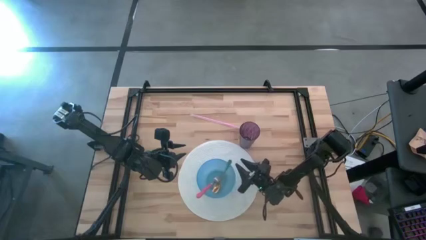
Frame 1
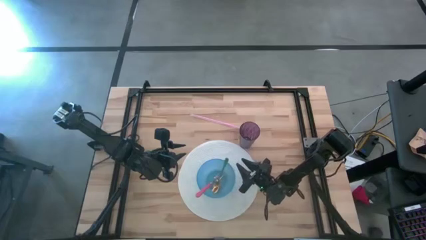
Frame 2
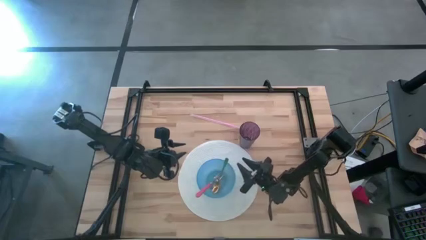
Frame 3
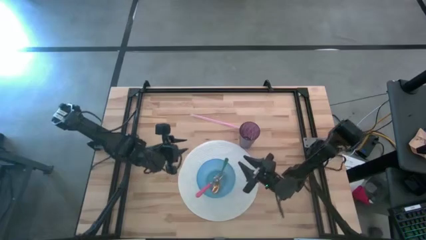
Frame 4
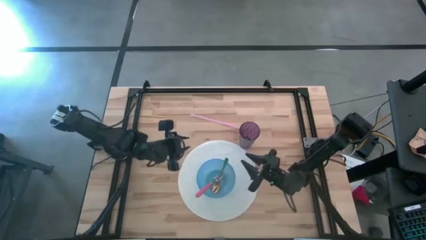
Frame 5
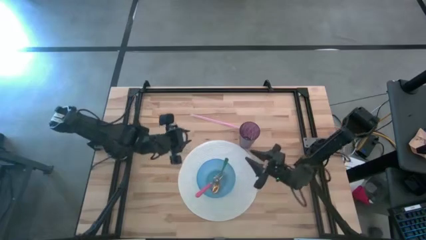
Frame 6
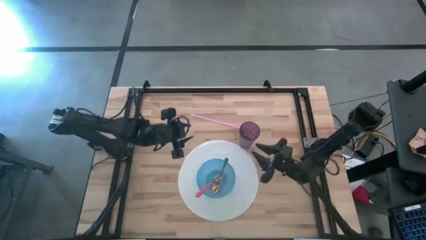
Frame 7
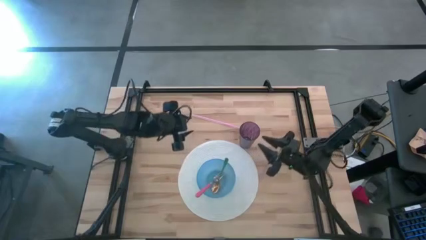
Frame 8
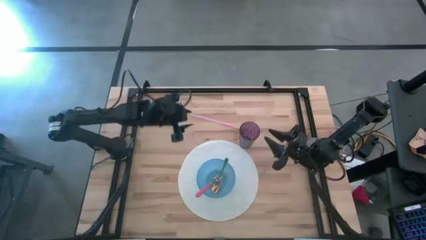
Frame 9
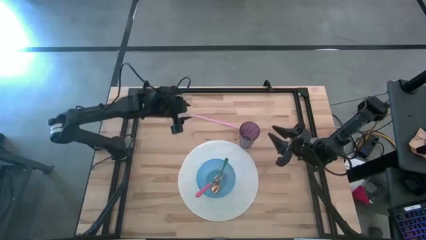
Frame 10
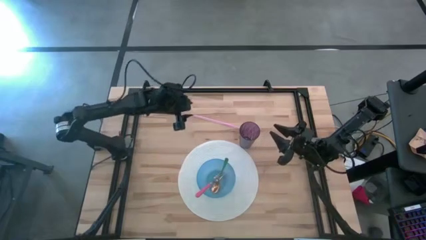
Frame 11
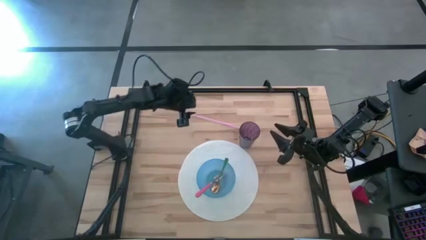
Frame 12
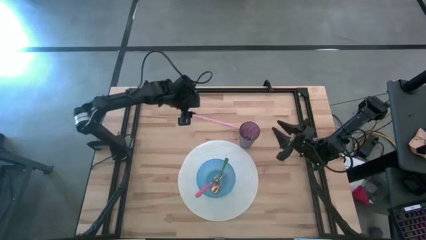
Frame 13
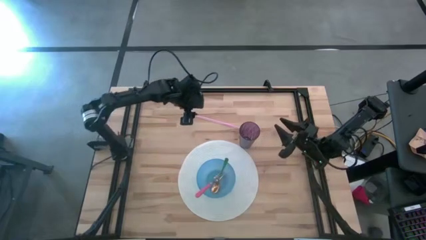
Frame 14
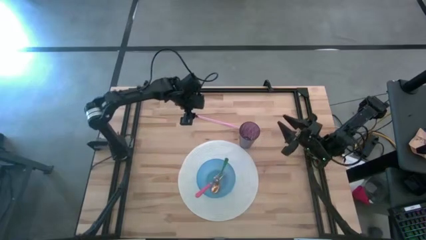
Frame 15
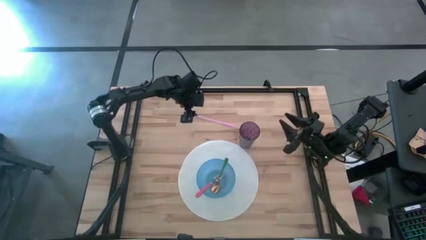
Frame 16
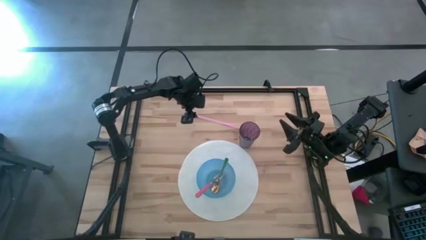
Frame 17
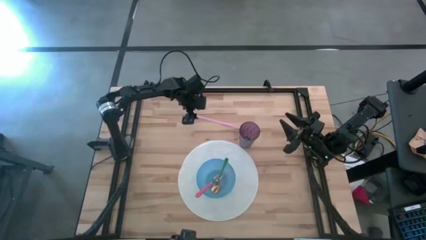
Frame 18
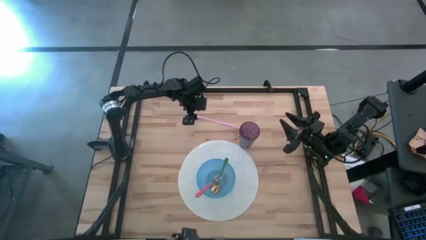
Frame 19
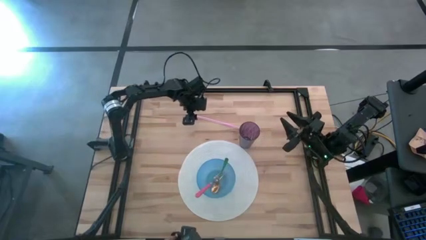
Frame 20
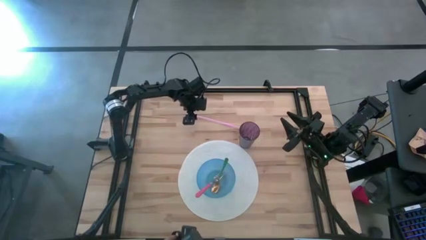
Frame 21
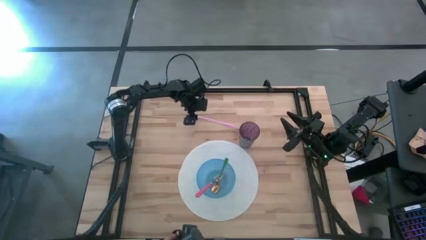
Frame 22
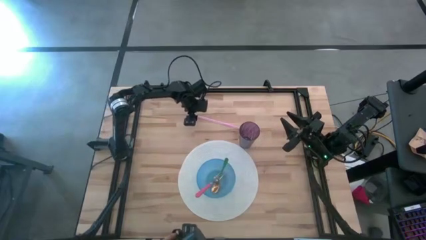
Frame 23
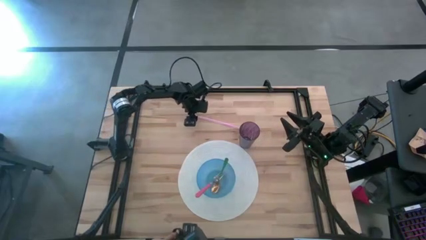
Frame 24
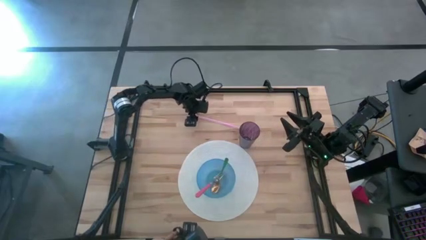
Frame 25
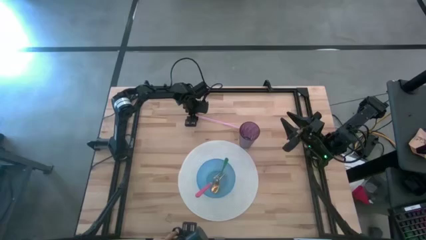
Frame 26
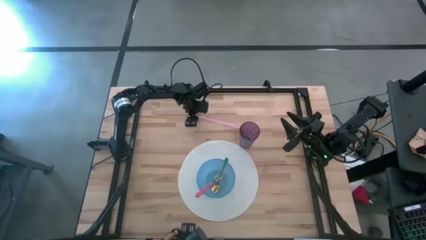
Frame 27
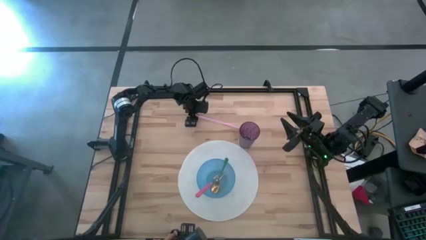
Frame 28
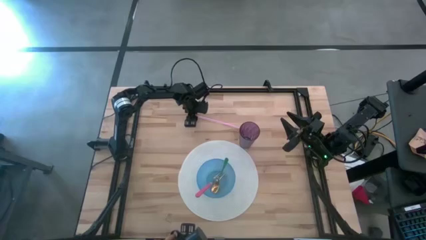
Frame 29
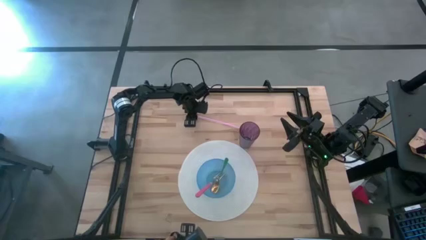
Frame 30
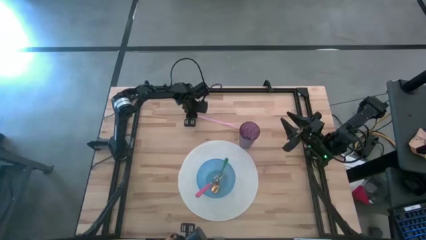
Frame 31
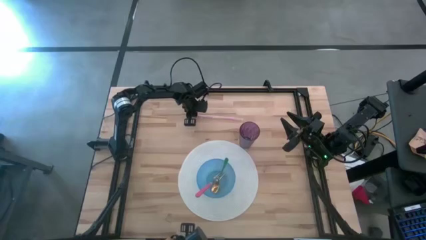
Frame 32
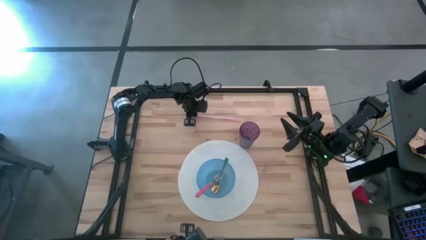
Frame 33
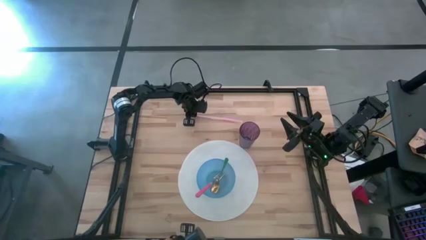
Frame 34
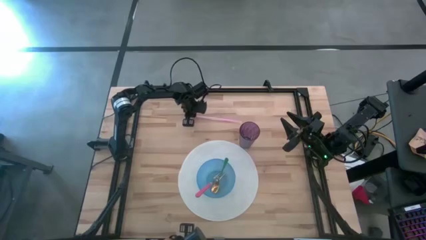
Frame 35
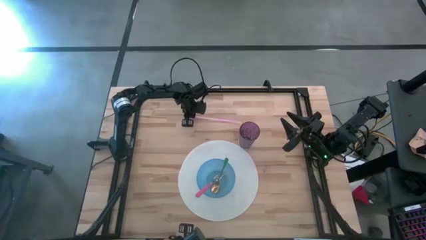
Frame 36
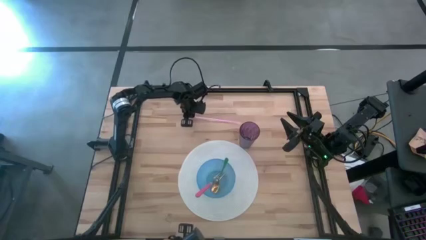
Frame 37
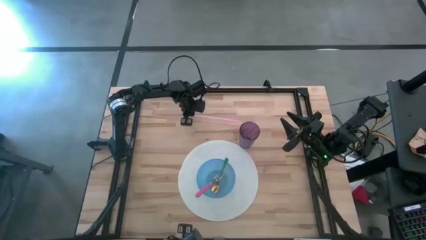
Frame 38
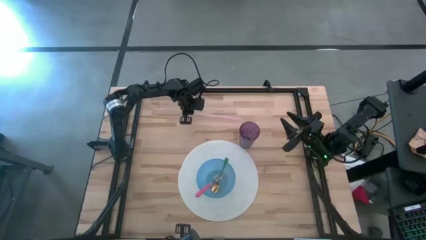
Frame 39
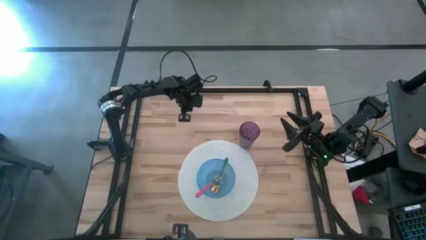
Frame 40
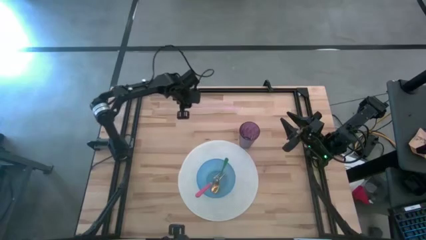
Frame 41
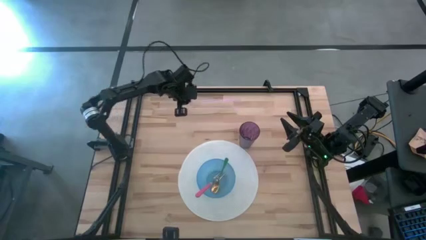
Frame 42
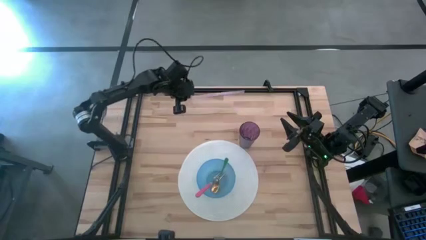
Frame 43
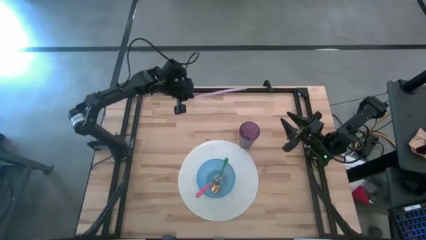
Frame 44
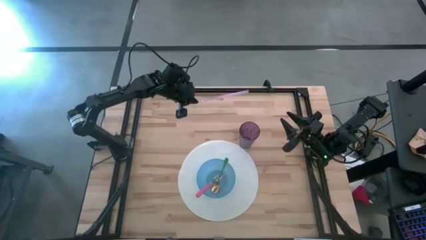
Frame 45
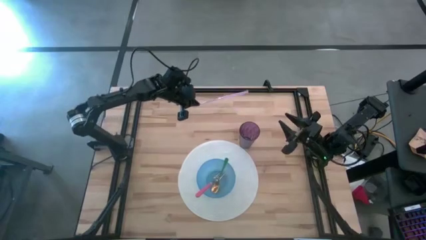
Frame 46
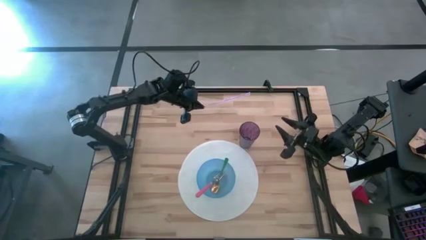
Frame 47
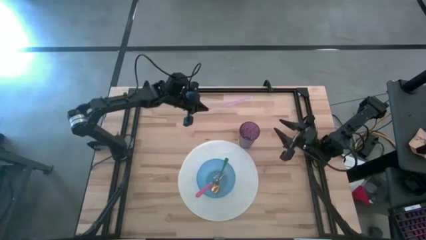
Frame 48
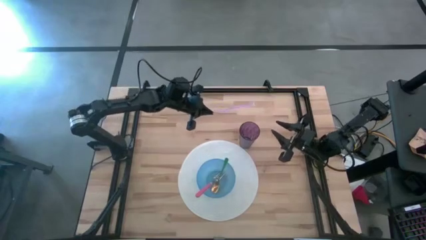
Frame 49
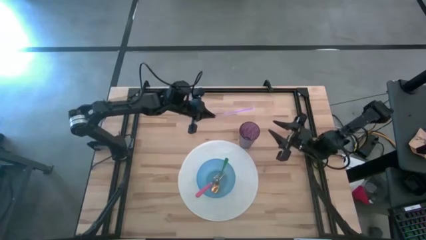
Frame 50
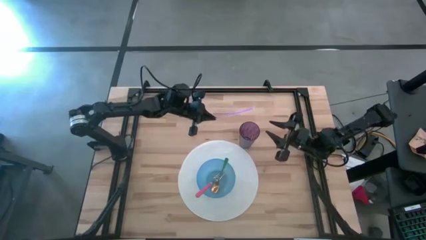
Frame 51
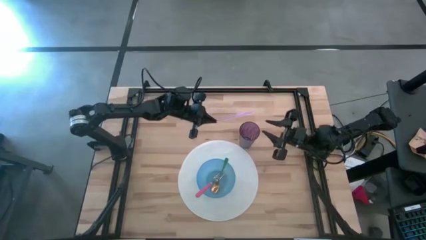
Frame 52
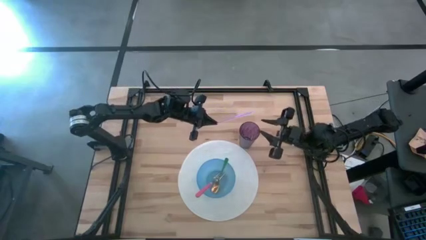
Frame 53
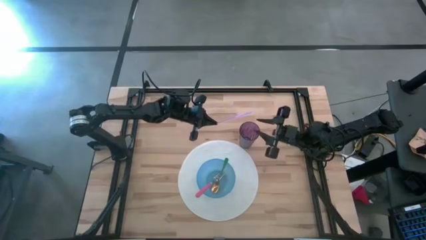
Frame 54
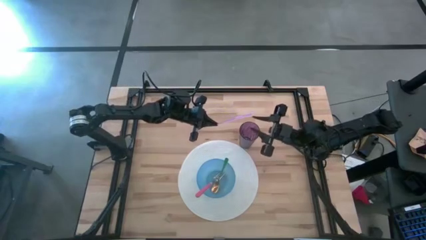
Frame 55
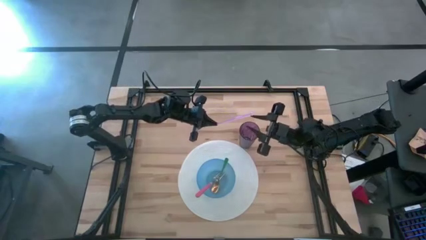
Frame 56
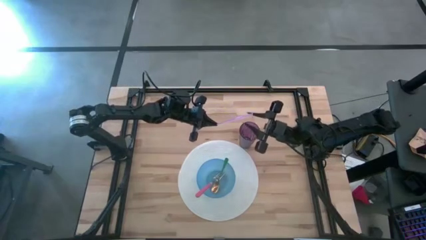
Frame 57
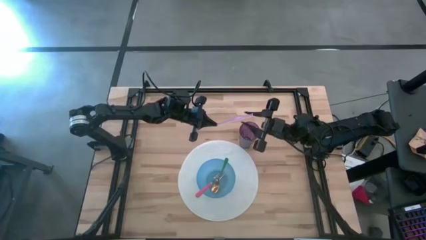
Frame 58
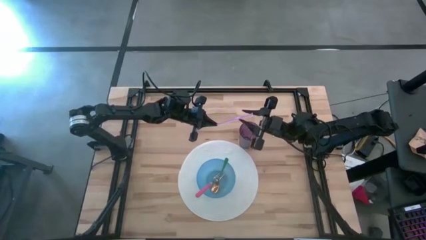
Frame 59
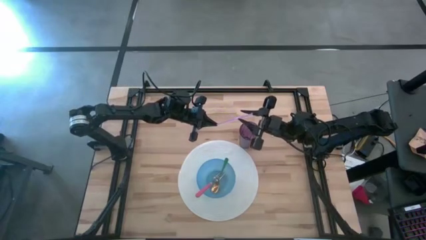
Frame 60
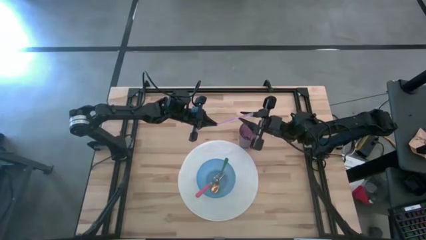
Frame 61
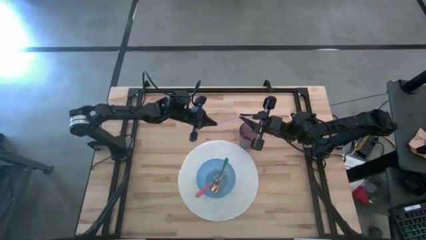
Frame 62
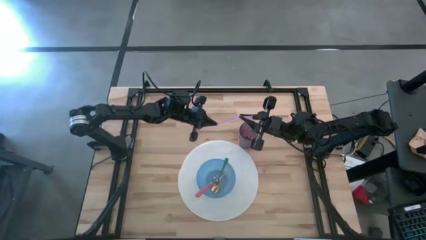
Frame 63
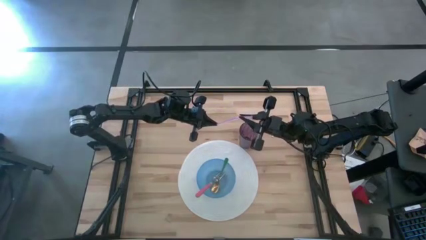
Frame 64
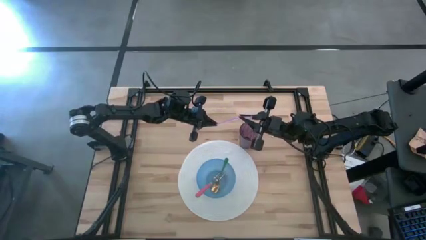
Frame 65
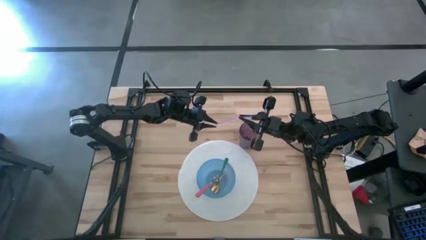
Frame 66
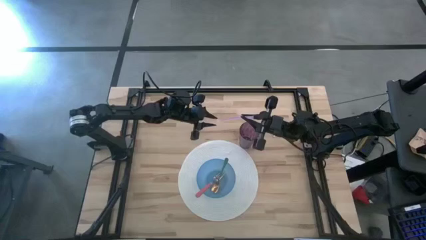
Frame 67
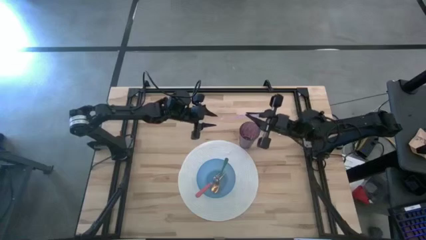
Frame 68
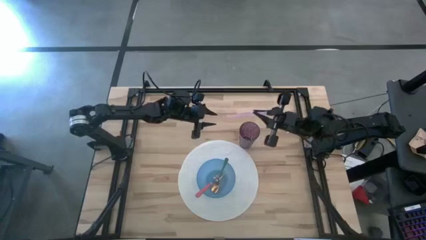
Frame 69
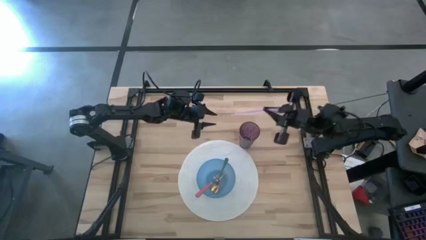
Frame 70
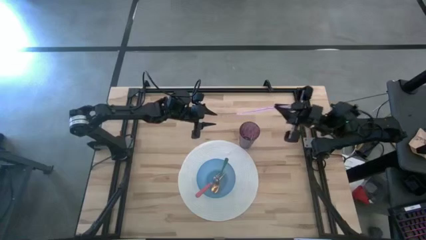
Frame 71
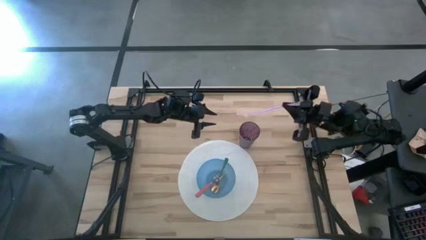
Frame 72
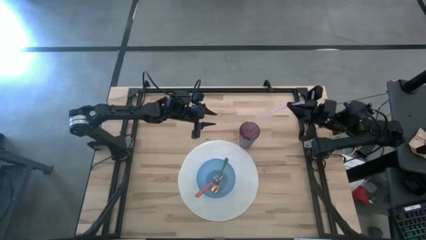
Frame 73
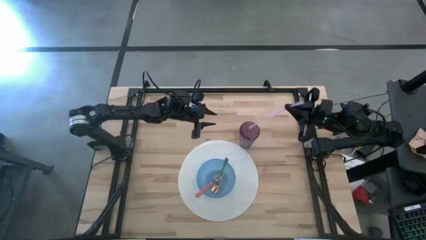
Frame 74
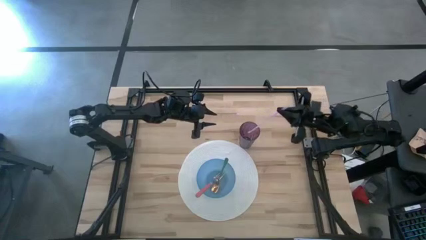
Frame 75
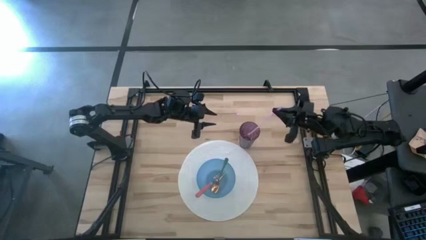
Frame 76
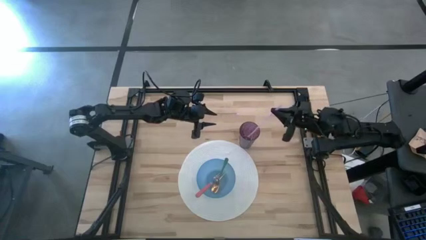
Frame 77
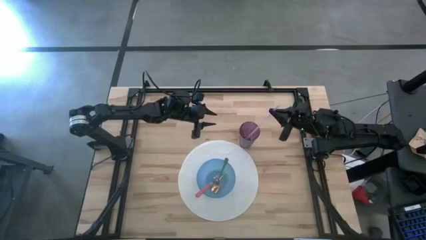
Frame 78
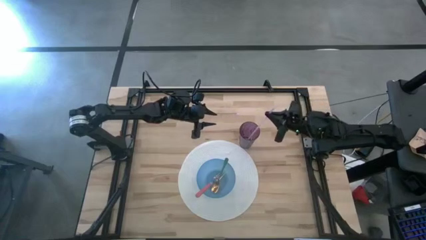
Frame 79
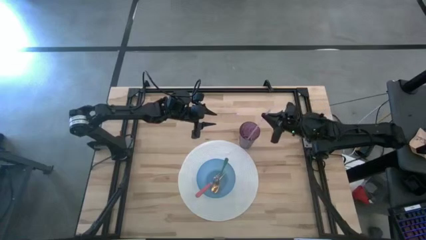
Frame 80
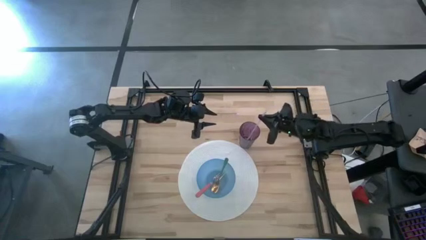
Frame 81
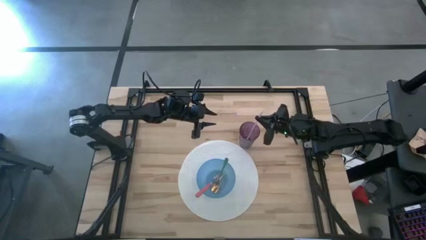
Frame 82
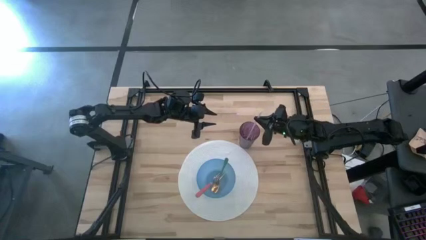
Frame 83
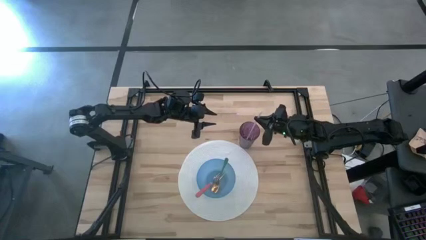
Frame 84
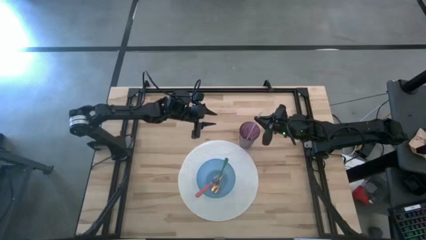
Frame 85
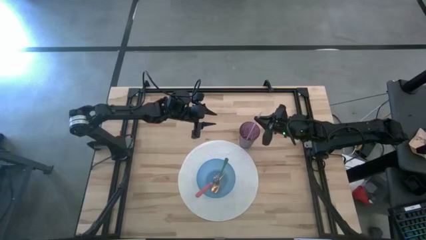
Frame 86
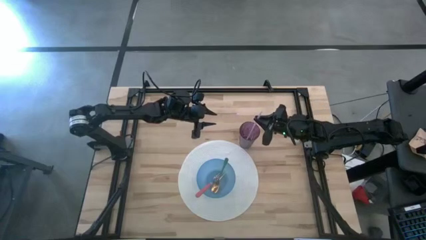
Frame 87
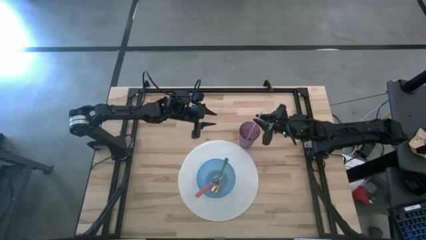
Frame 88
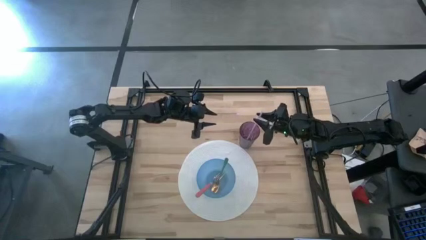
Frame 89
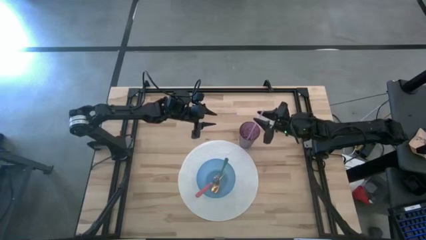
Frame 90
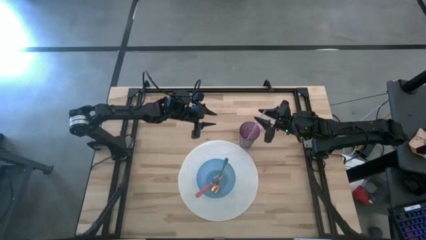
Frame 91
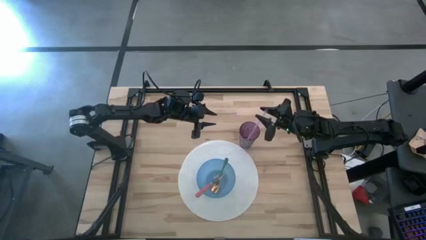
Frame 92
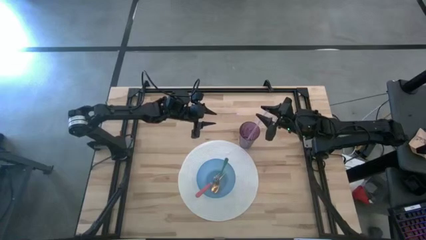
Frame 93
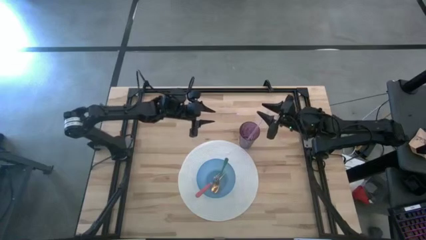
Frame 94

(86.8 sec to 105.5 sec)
Task: Pick & Place Utensil
Put the pink straw in the purple cup
